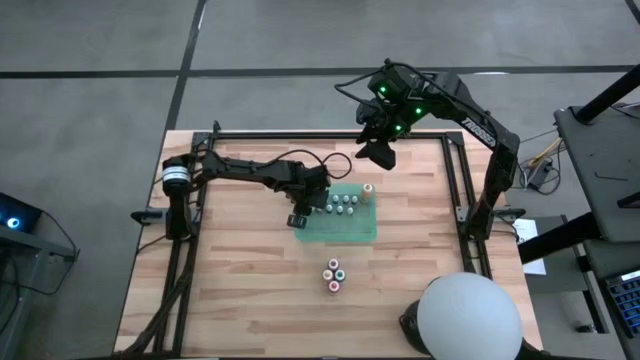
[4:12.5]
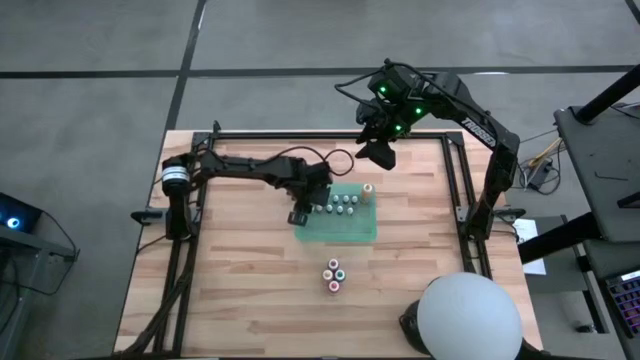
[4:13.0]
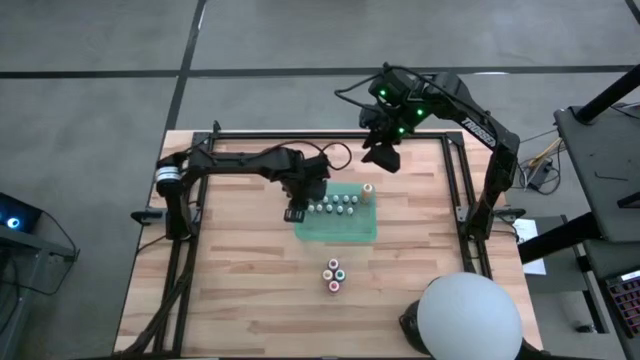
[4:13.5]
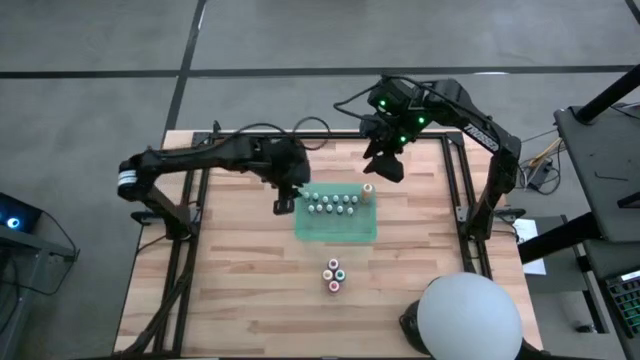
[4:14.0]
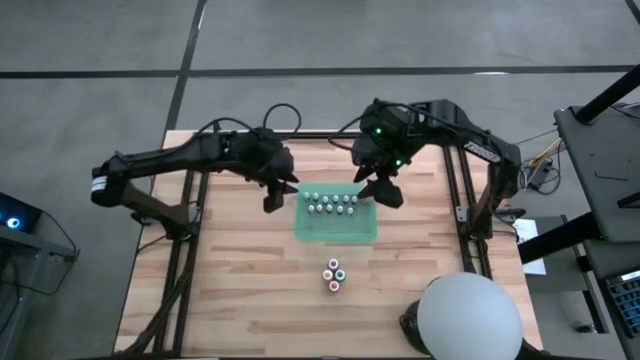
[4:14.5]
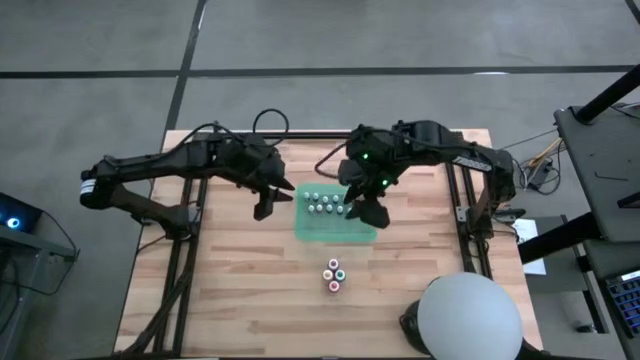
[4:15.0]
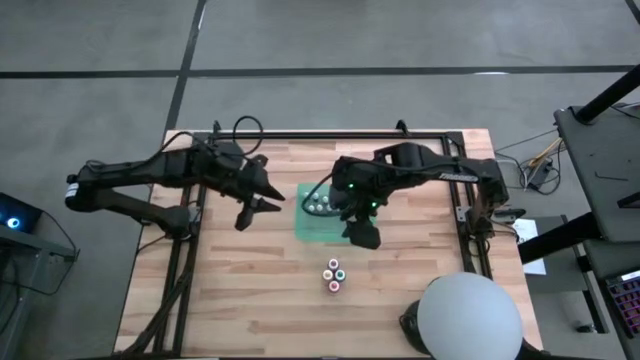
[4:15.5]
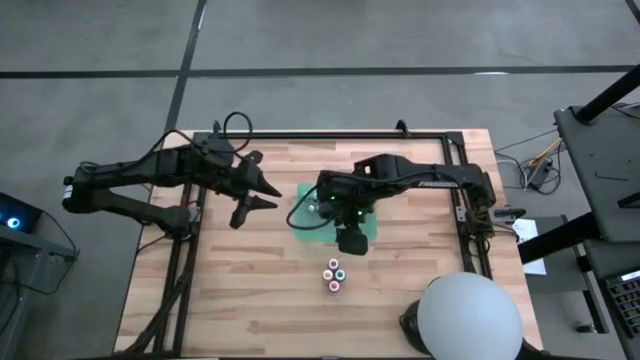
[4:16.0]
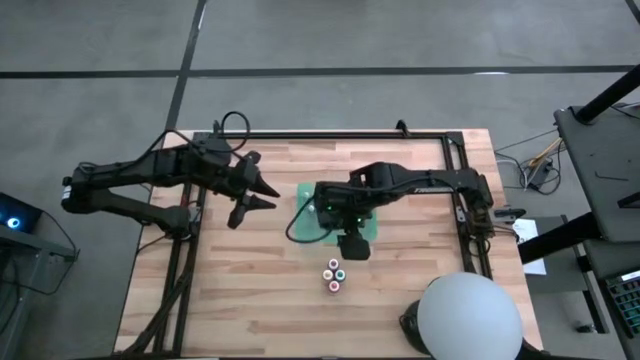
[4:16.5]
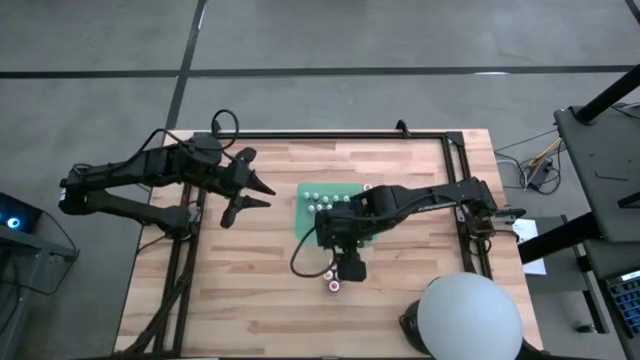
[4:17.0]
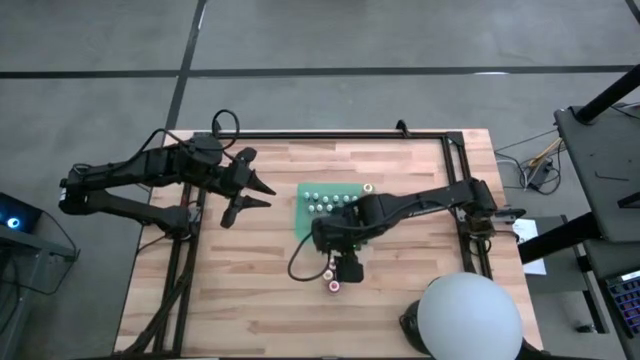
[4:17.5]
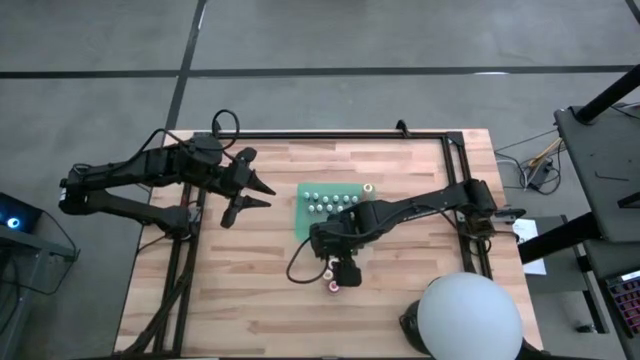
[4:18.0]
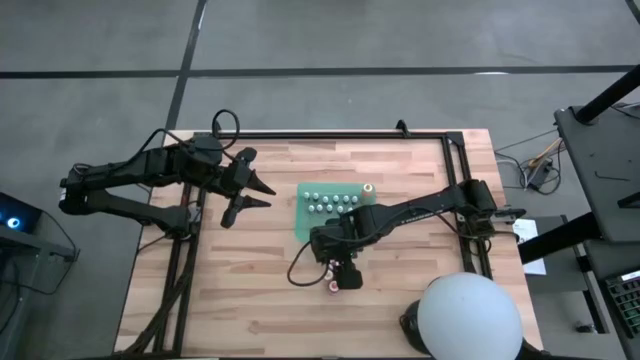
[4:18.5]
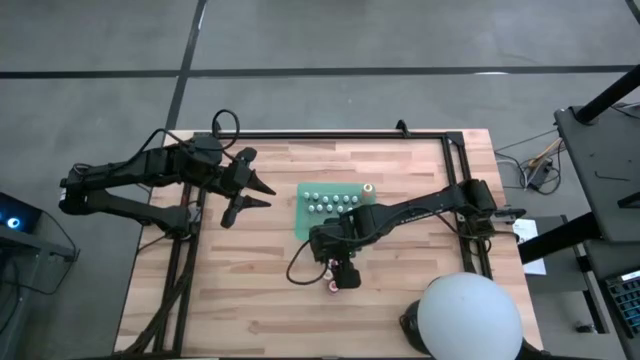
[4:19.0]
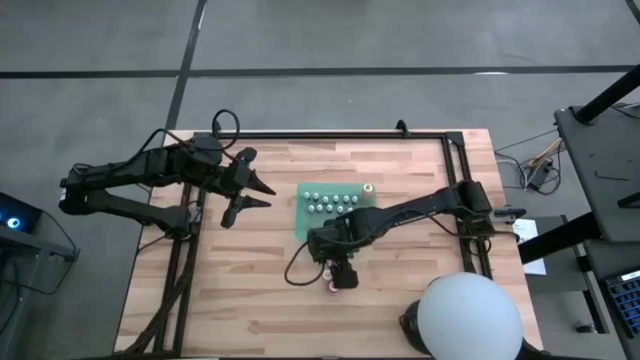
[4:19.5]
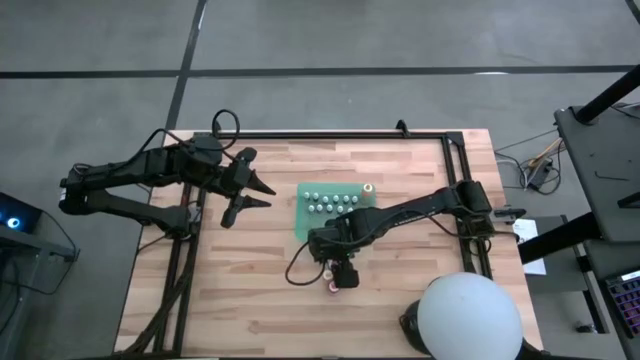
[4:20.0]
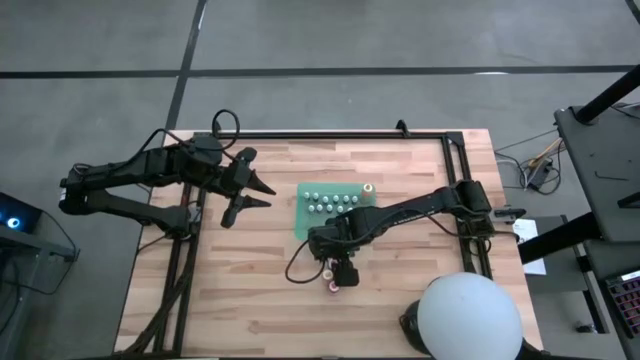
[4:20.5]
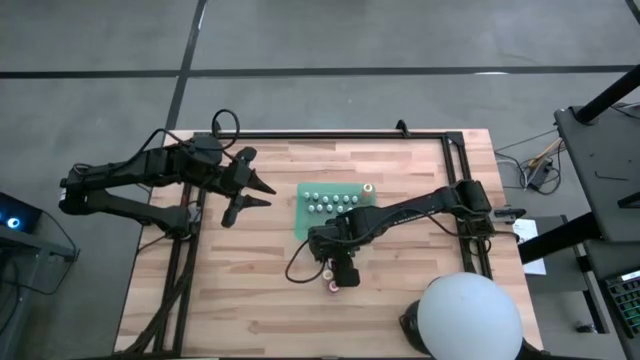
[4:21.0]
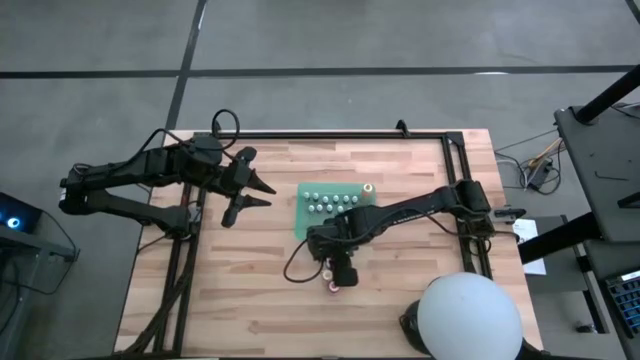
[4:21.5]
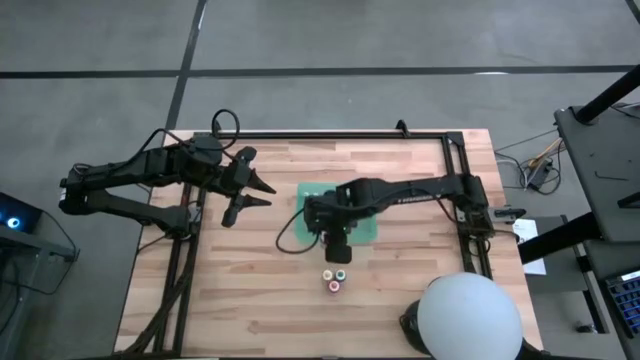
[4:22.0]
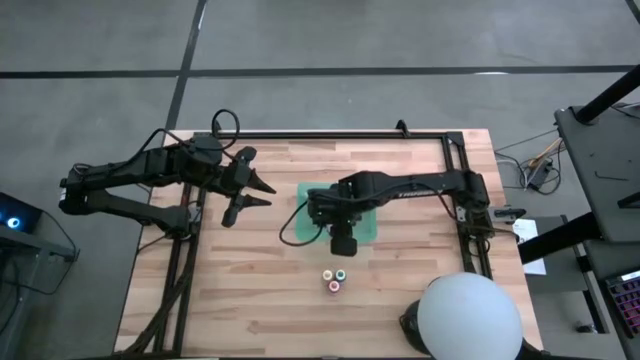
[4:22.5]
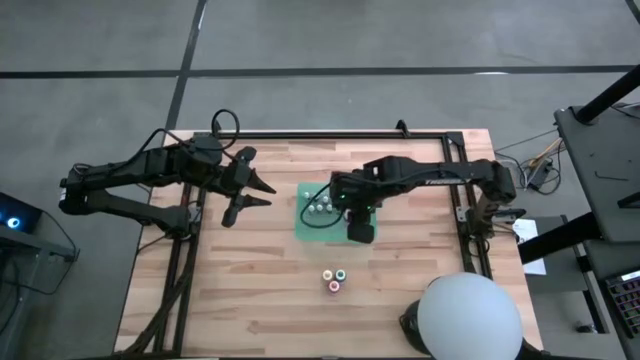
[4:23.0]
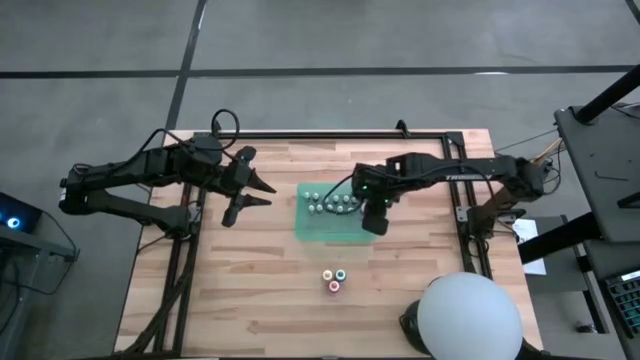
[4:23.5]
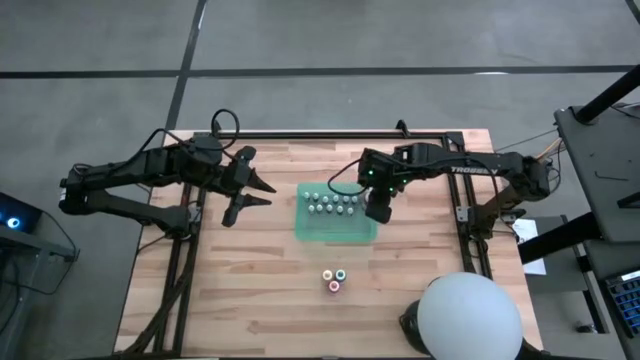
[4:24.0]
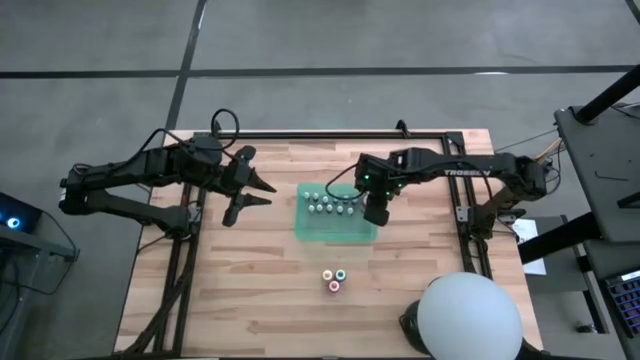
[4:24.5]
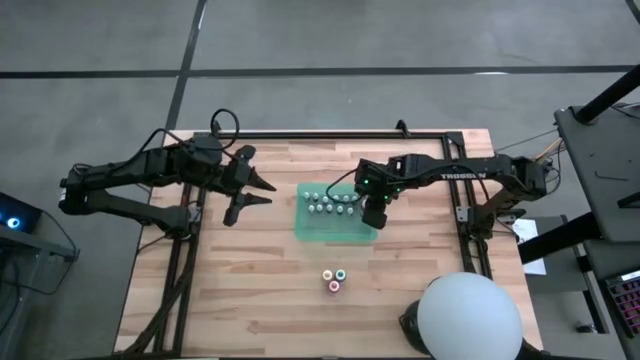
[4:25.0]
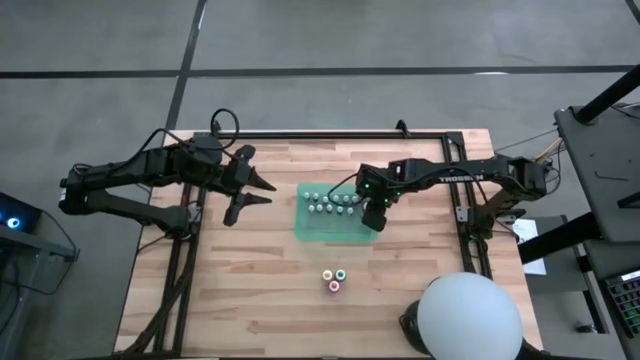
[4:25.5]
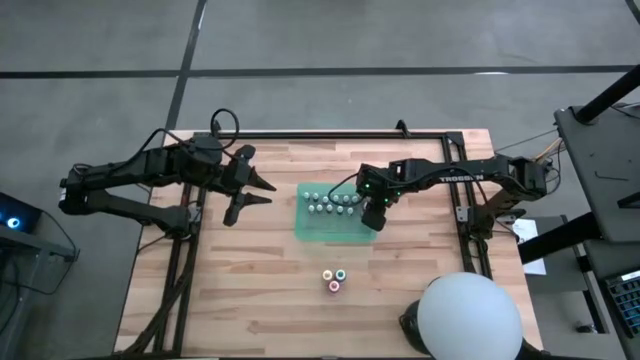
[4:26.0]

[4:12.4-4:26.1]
Task: Pick & Place food coloring
Put the big red food coloring bottle into the green container

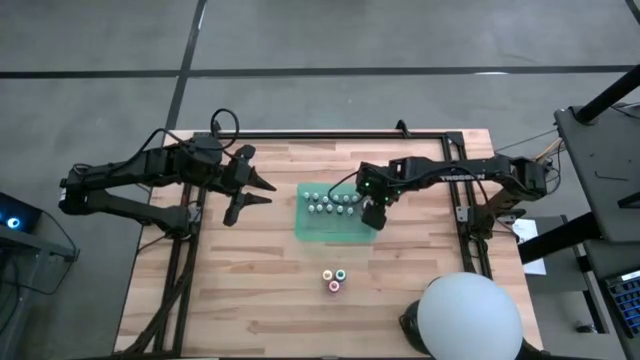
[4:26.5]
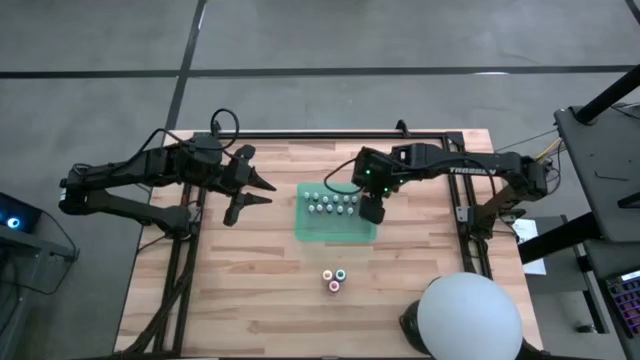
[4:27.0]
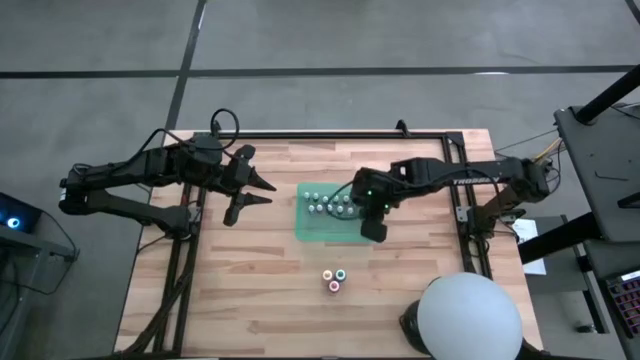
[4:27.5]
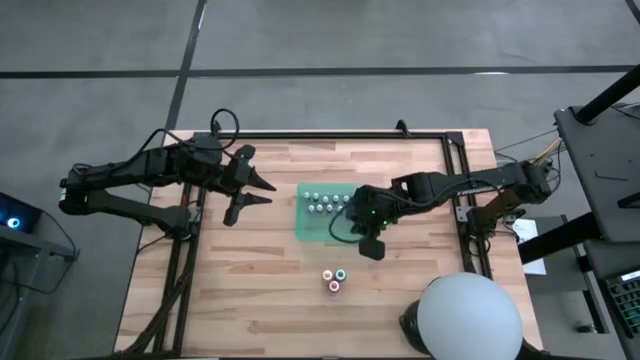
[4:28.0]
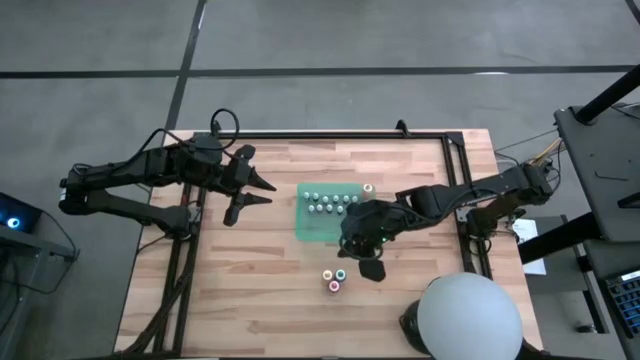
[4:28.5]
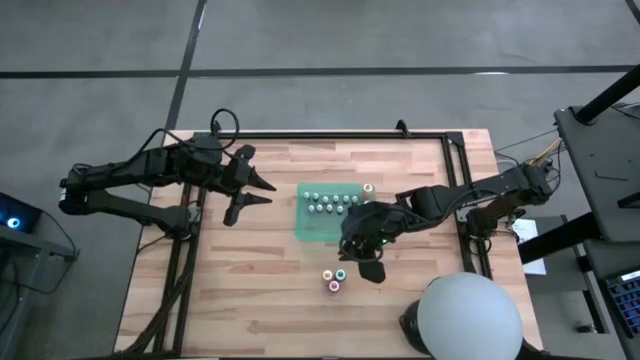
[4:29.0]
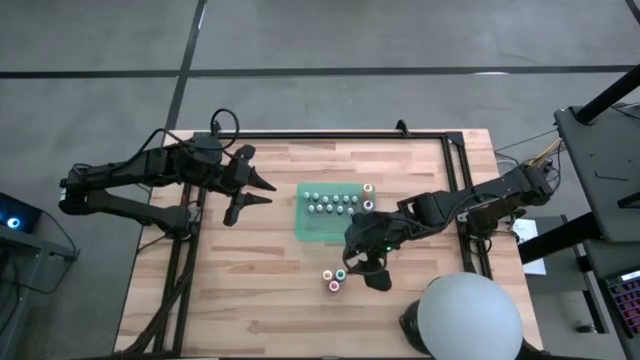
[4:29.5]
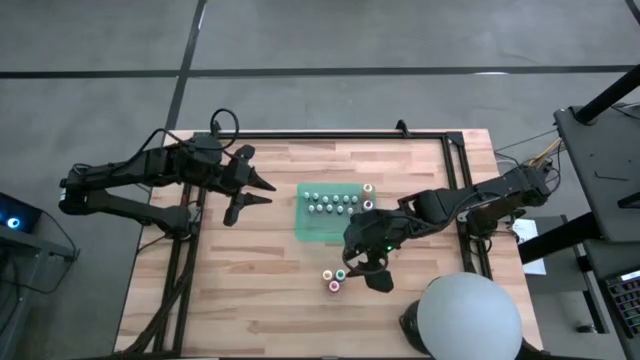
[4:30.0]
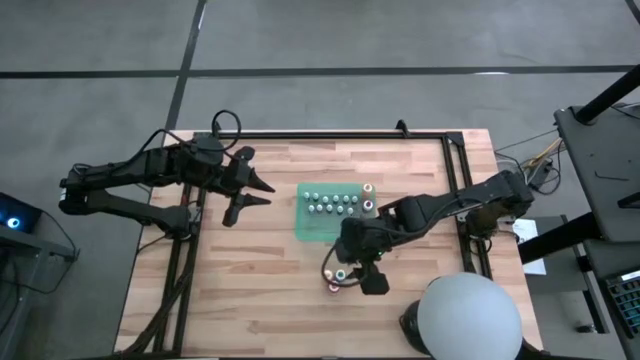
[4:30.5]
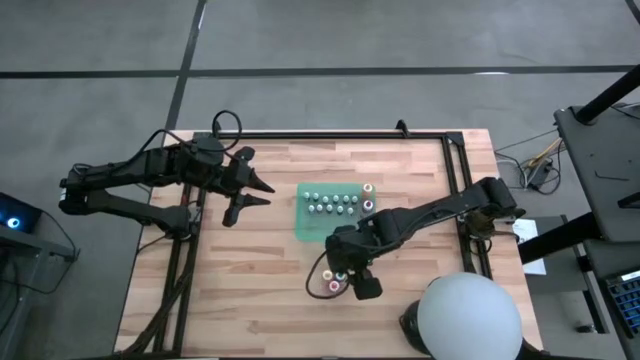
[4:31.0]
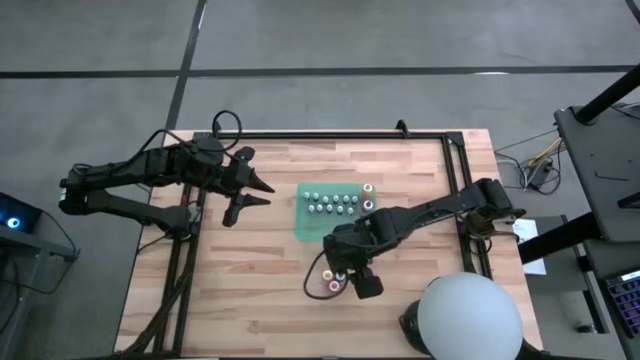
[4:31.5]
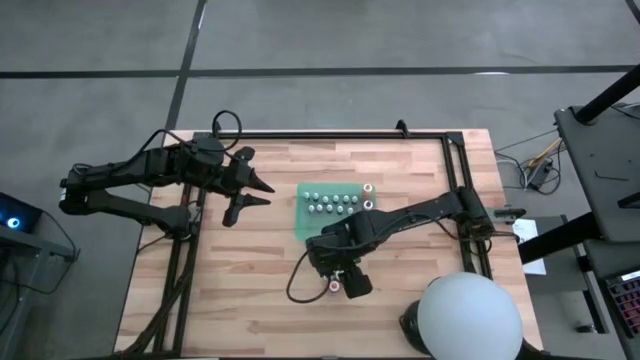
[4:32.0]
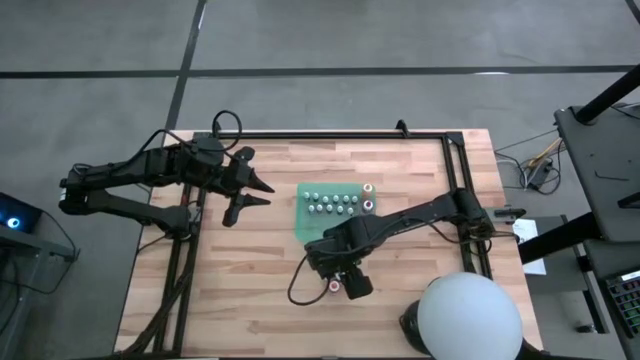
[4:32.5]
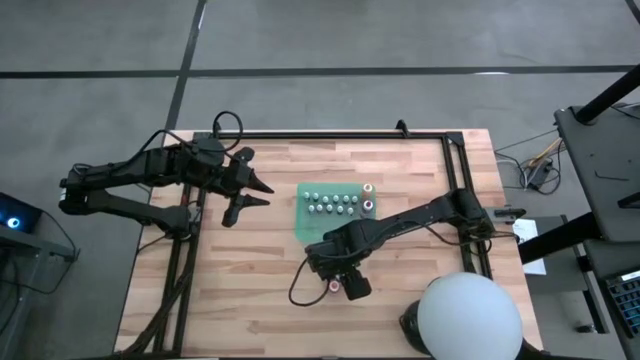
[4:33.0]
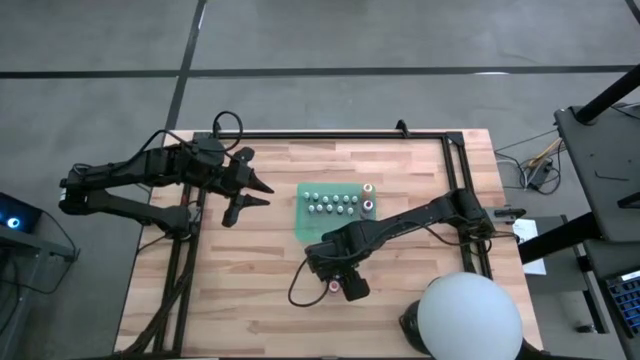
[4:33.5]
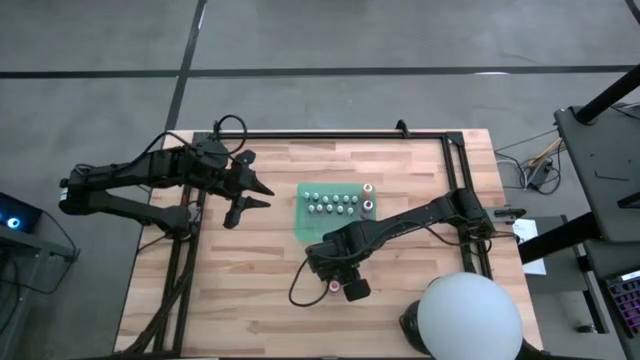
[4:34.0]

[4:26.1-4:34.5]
Put the big green food coloring bottle into the green container

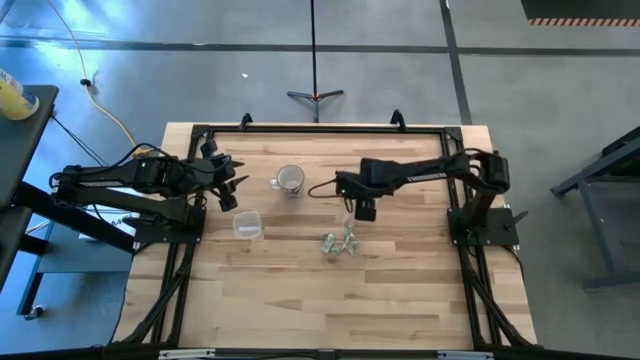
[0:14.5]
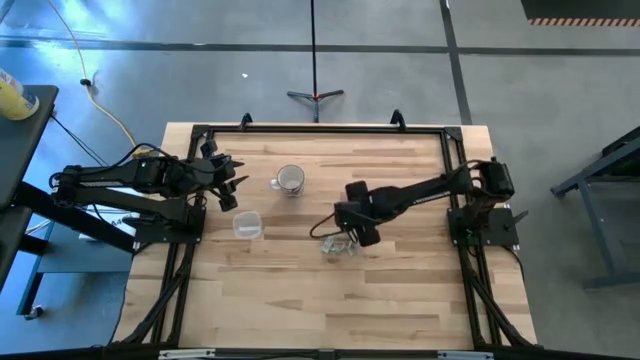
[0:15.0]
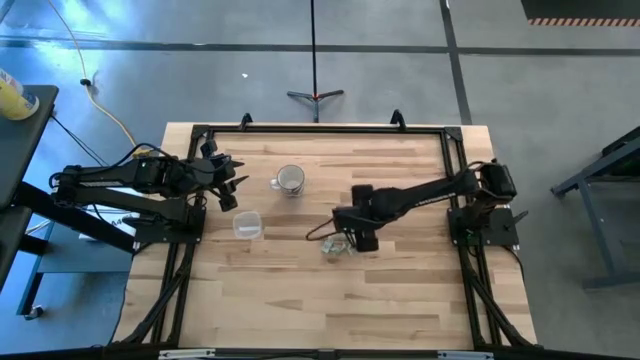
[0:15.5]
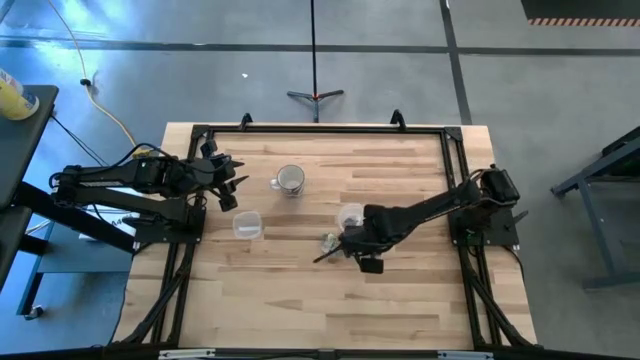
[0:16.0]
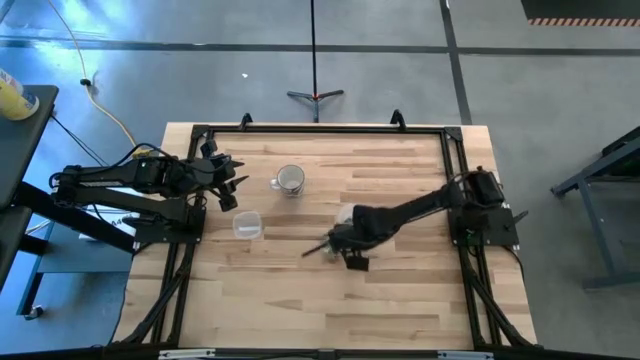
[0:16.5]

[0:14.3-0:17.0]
Task: Pick and place Stevia / Truvia into bins
Adjust the transparent container
